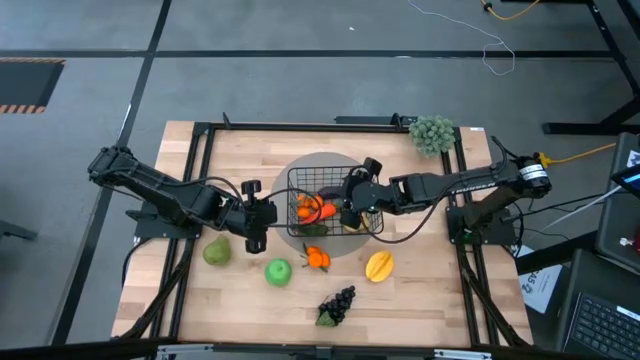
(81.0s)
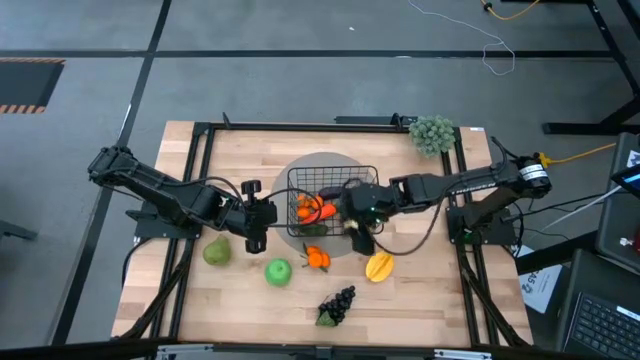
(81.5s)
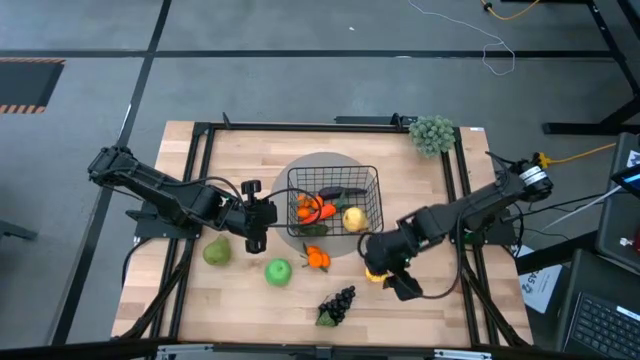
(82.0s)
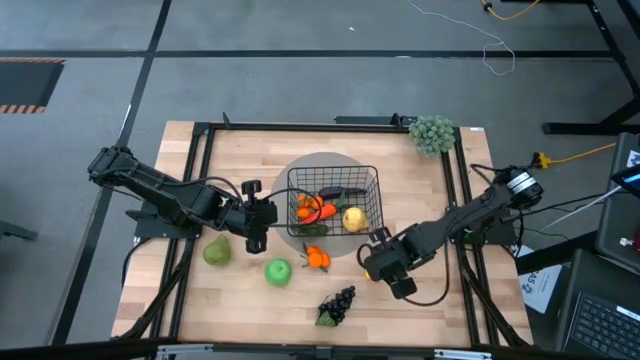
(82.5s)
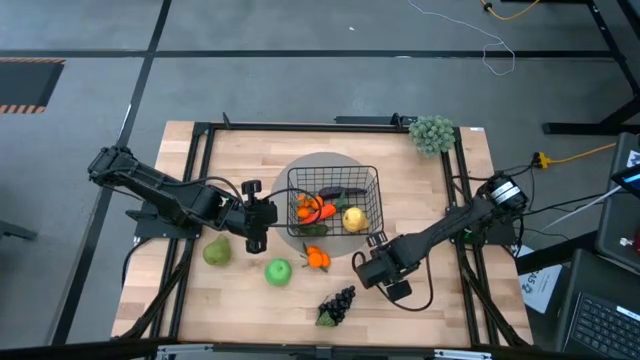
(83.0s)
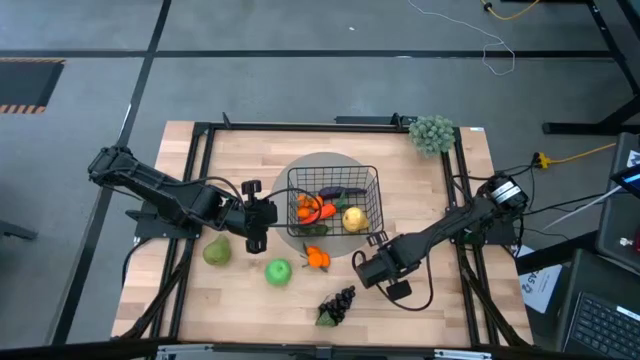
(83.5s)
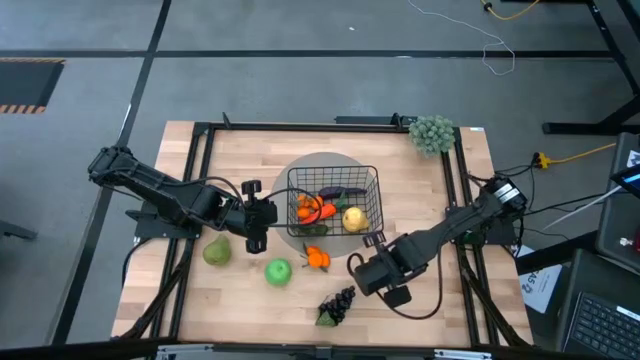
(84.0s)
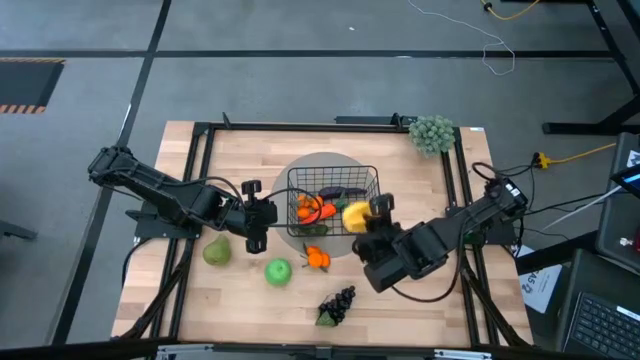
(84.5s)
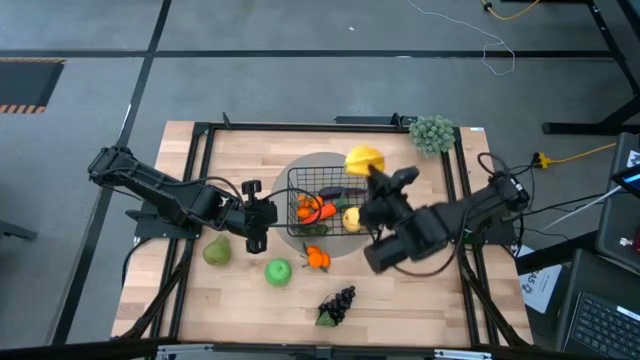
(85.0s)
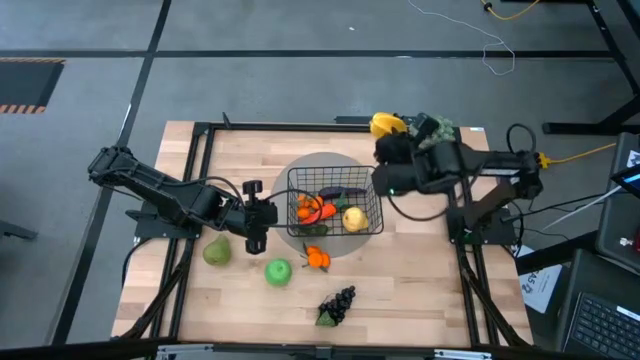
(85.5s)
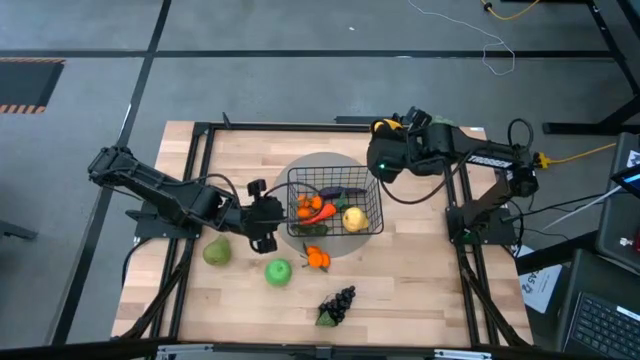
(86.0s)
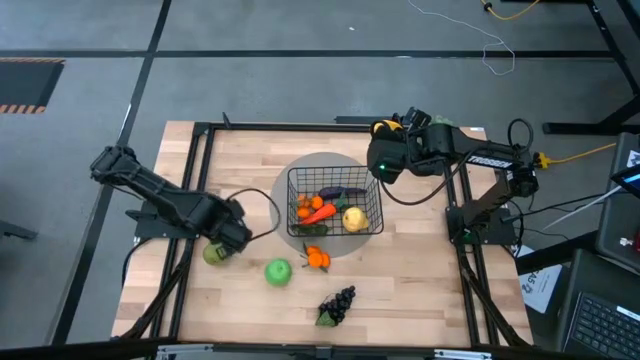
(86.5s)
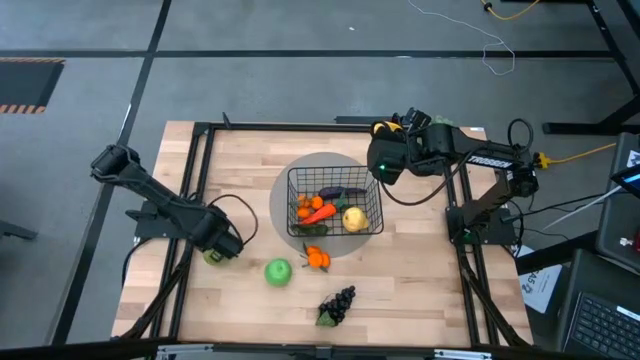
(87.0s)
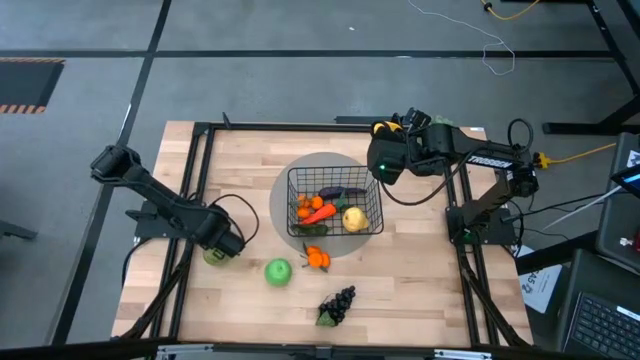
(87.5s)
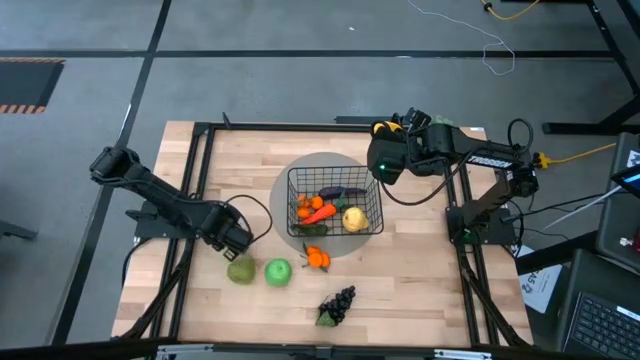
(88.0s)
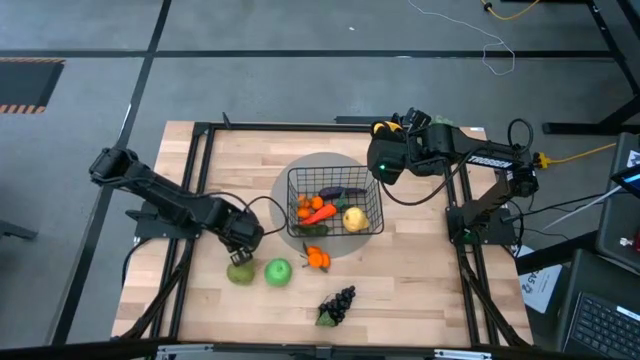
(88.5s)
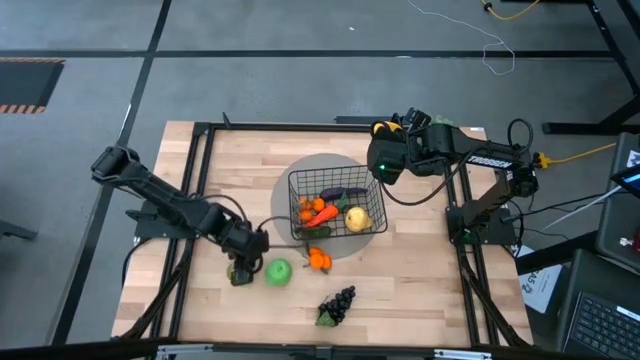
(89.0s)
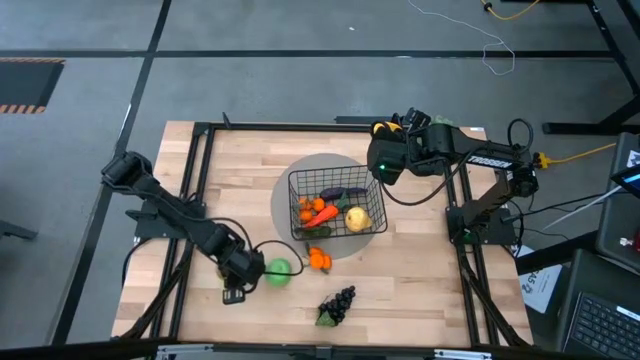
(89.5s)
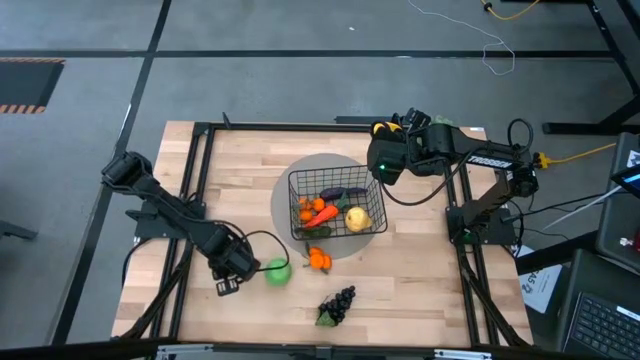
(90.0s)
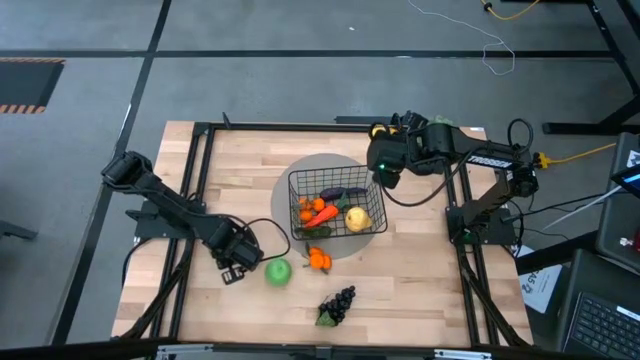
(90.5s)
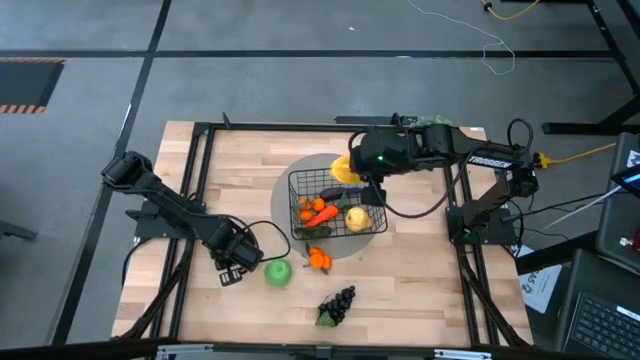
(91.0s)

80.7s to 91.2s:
Task: Build produce basket
Put the yellow starfruit into the wire basket

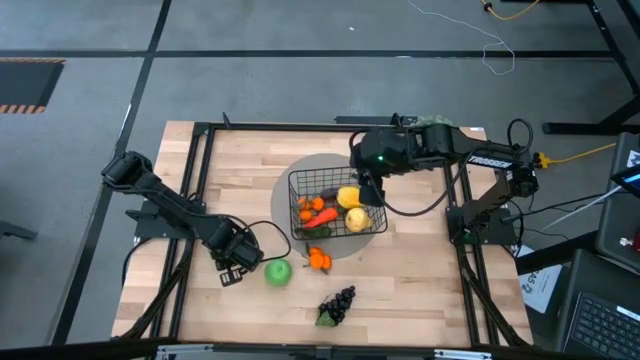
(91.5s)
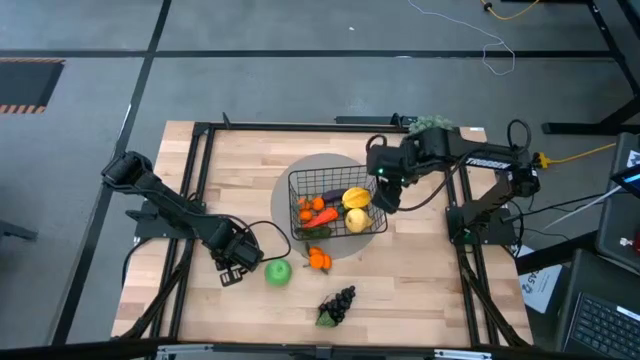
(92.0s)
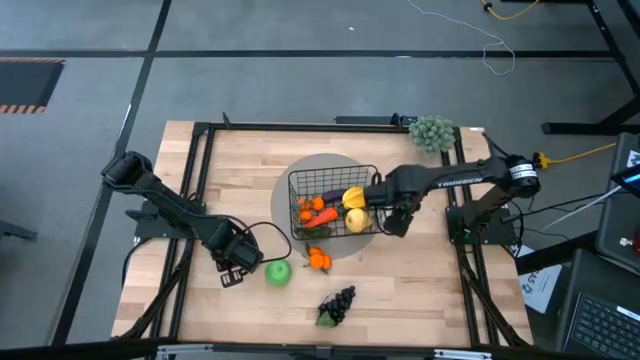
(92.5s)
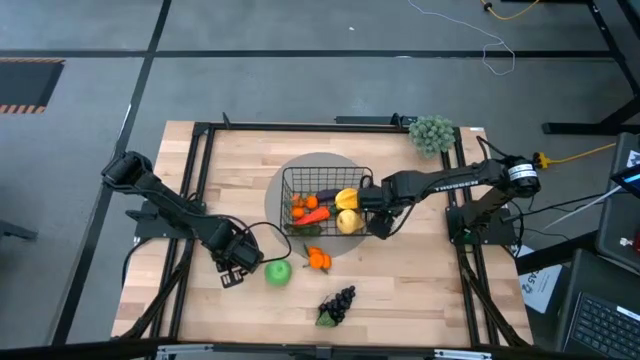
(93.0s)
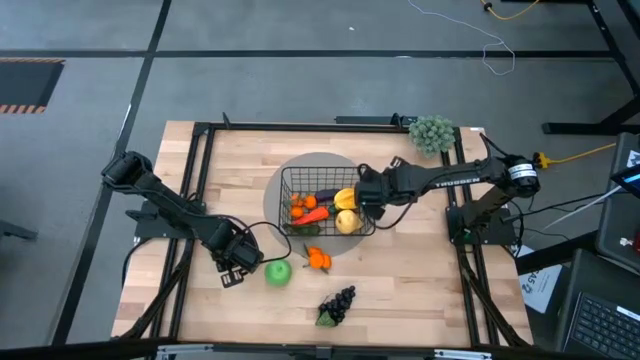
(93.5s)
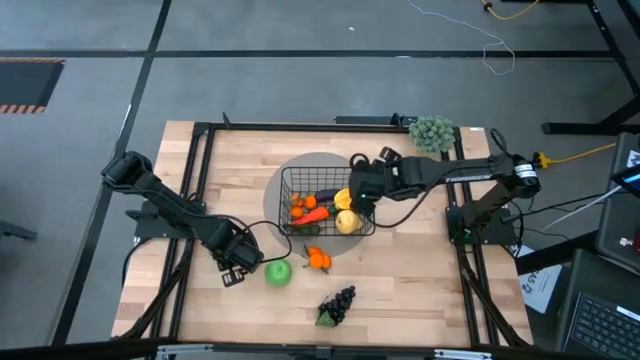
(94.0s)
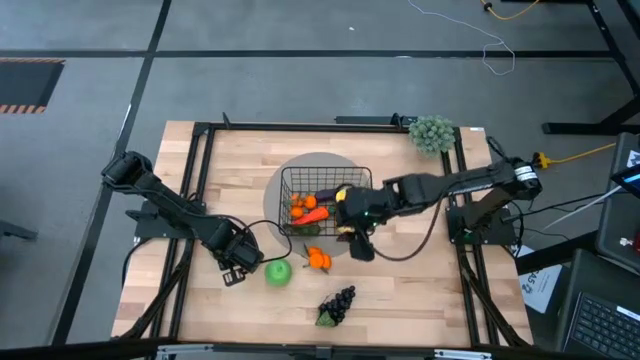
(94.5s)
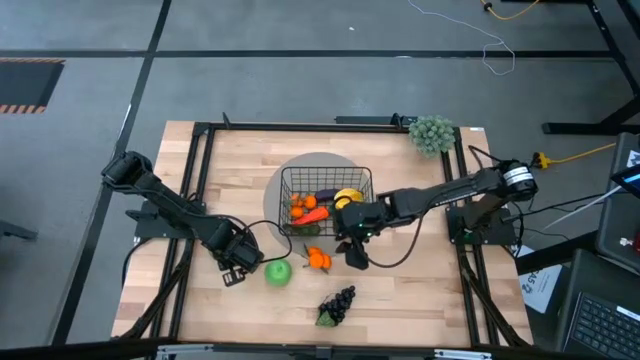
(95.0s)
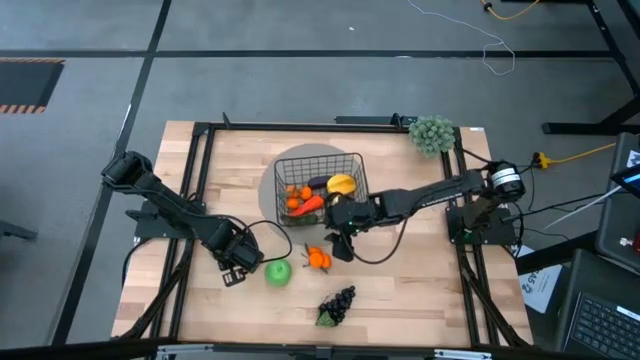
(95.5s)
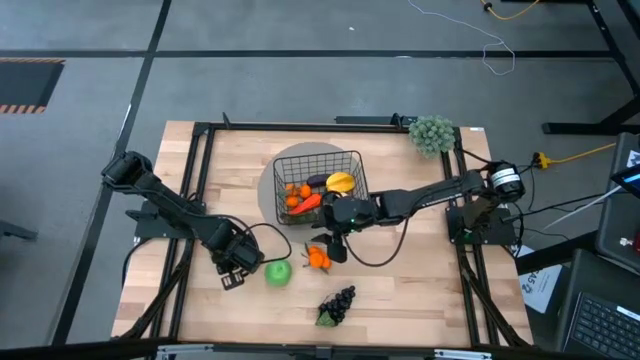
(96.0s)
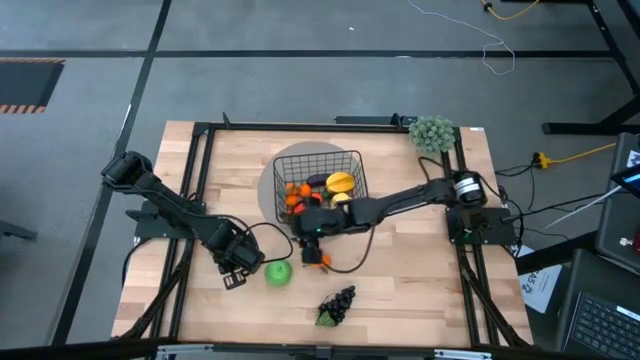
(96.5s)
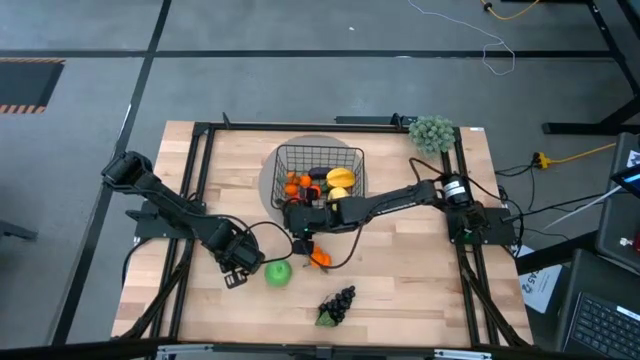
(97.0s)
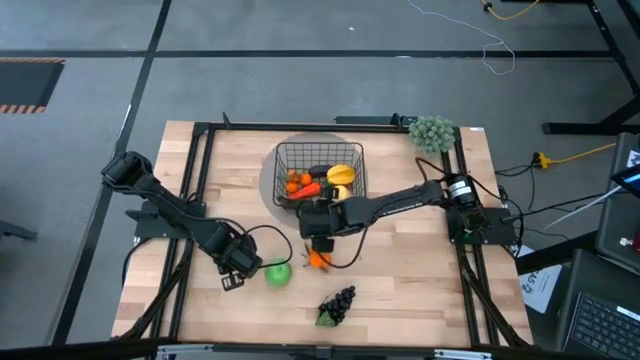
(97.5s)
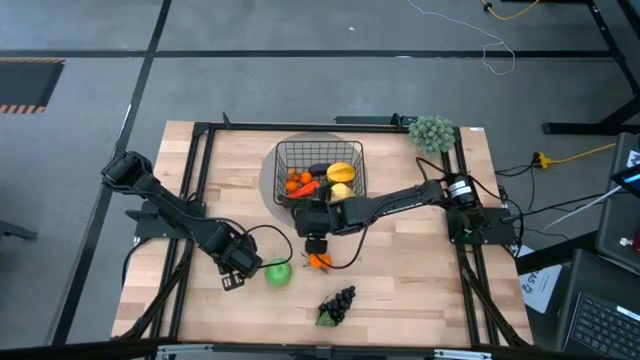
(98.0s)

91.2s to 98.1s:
Adjust the wire basket

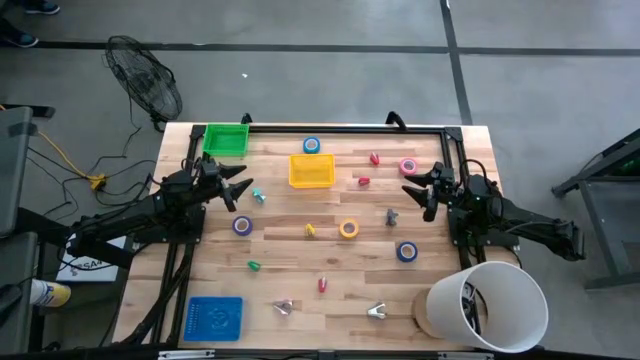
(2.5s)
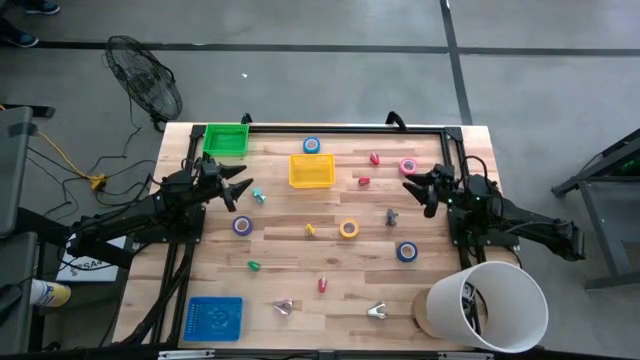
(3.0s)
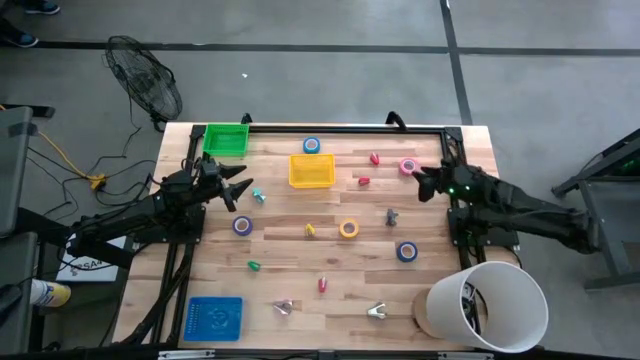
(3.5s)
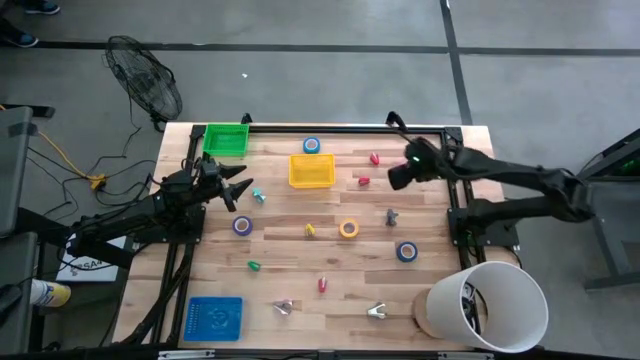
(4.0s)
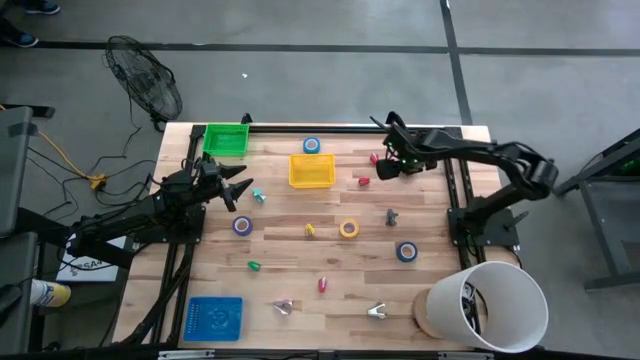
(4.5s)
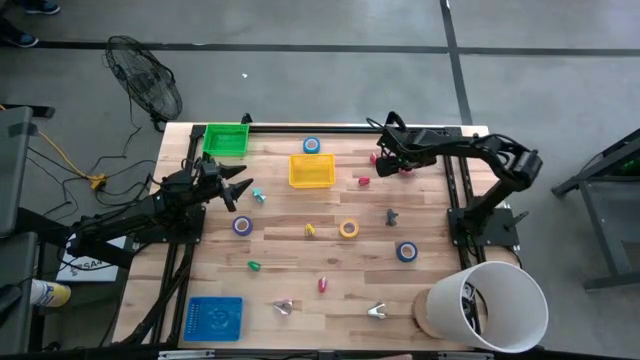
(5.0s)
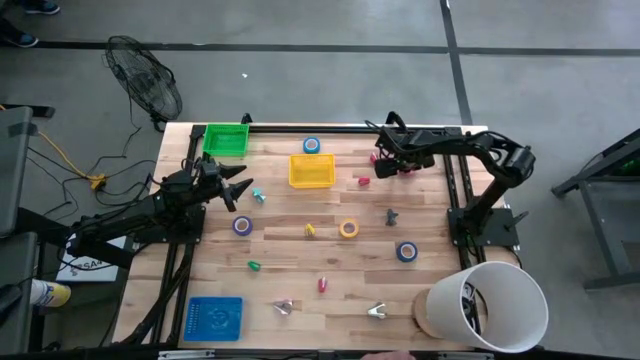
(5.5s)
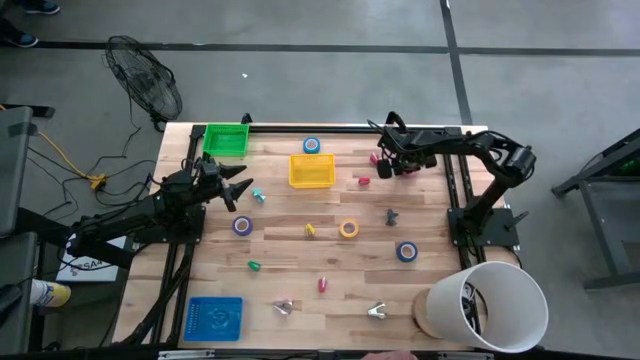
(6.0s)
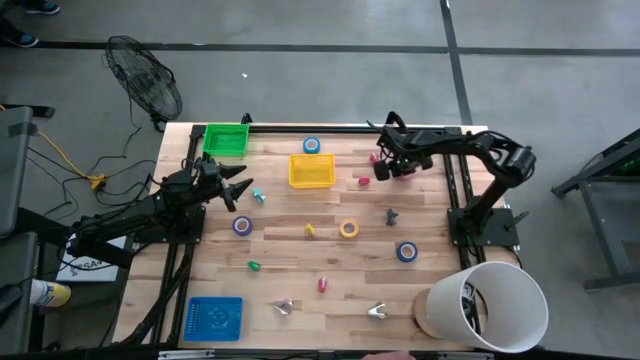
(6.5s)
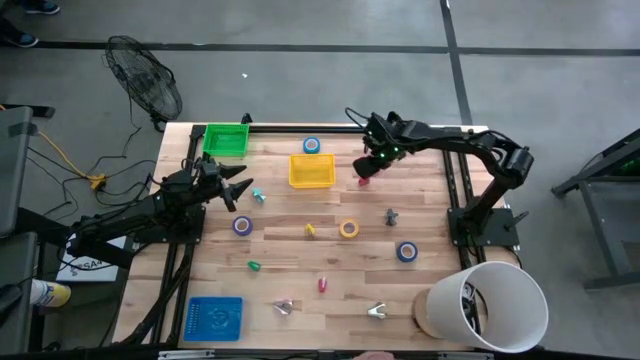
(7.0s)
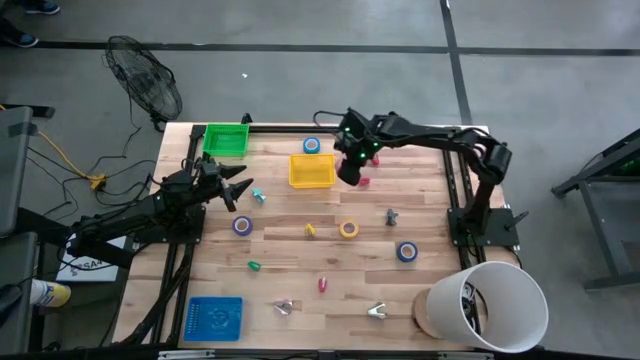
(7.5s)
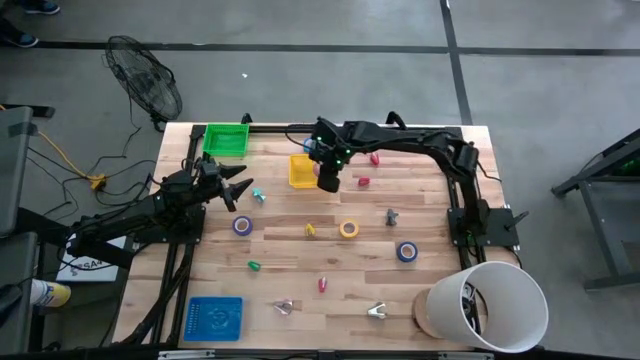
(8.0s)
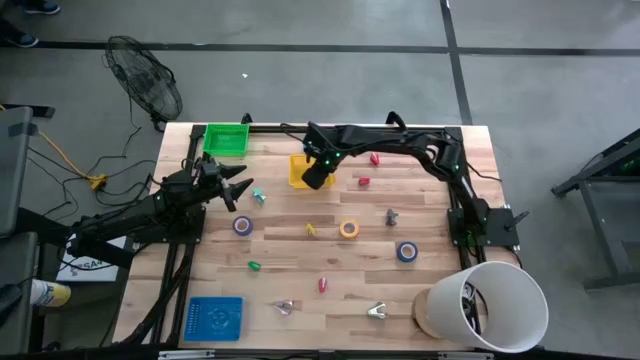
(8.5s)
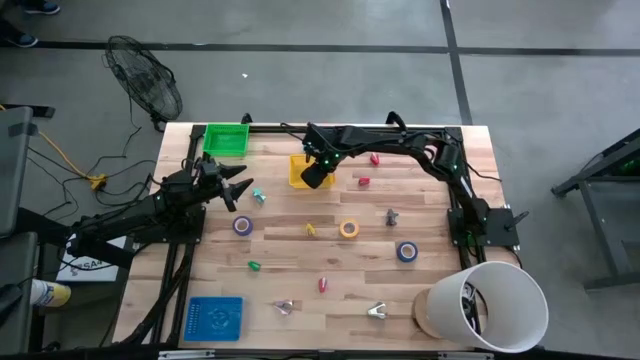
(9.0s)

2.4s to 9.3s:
Task: Pick and place Stapler, Stapler remover, tape
Put the pink tape into the yellow bin
